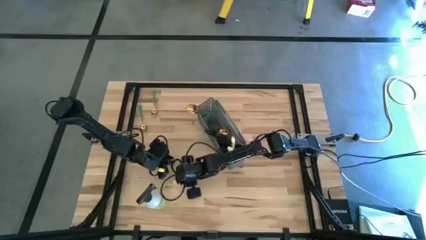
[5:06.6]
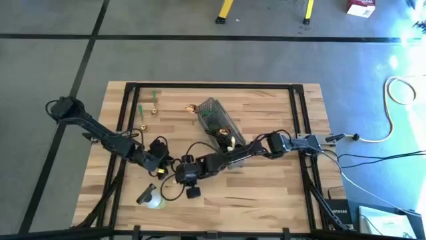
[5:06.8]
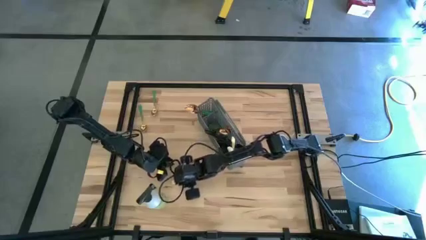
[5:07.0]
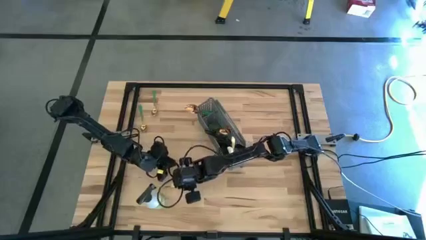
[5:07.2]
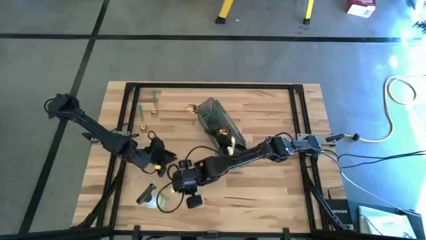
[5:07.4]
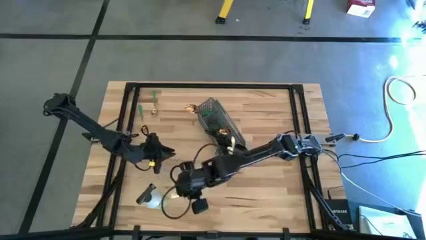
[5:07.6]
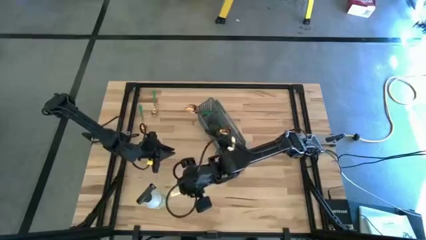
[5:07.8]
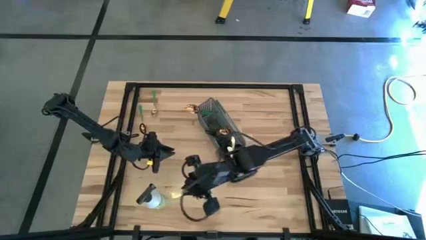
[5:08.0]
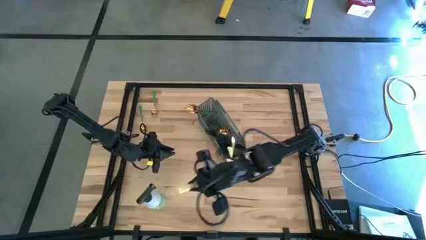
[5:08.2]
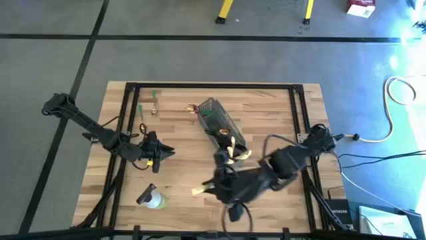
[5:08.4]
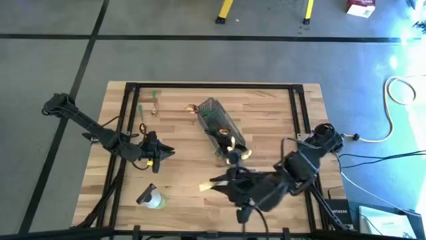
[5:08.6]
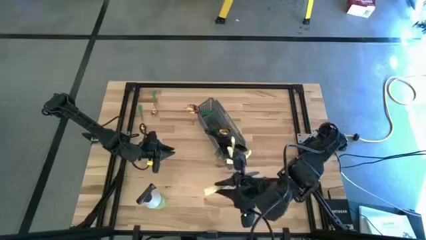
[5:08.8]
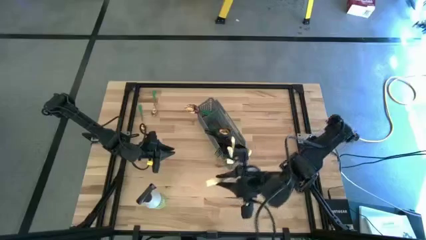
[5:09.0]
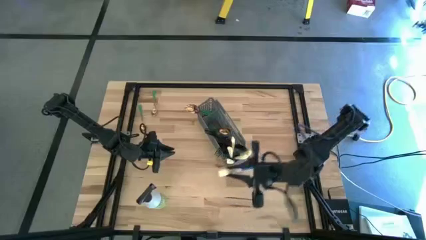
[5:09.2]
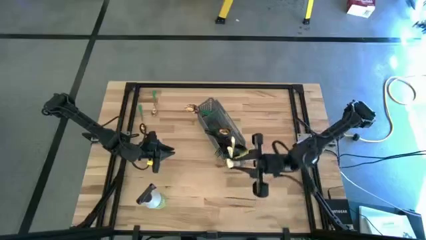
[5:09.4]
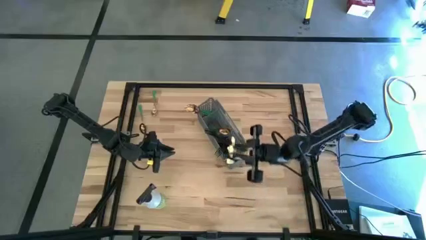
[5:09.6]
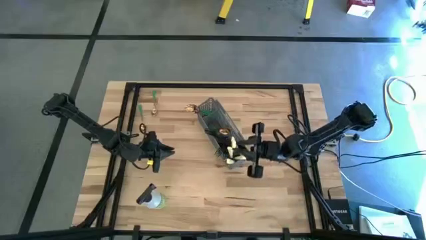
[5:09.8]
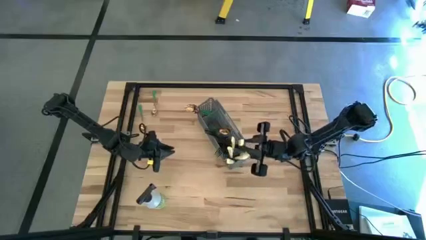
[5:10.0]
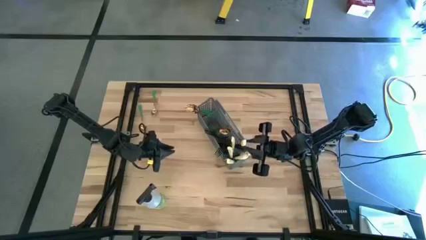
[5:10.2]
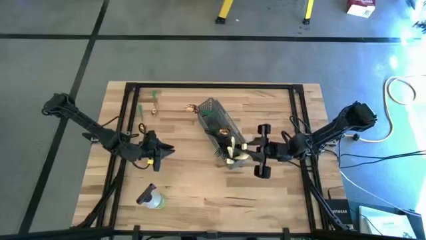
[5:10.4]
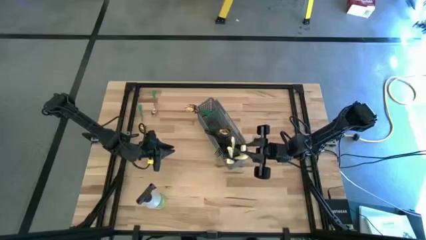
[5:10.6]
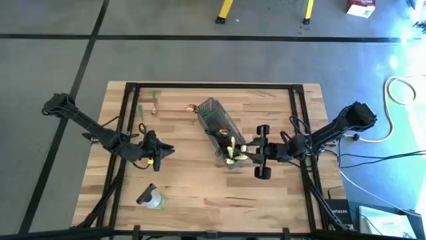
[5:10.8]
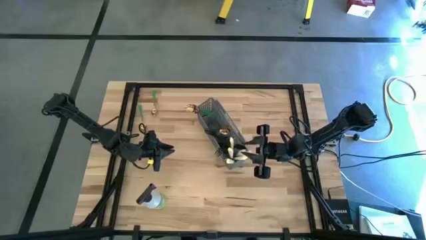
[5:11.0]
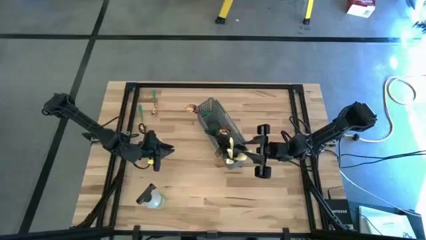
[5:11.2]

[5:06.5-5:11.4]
Task: Sort silverware
Put the silver knife into the cutlery rack

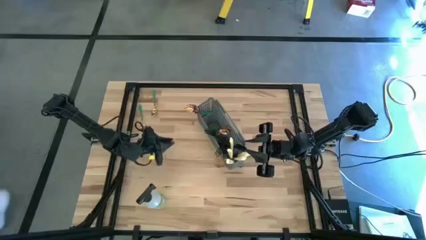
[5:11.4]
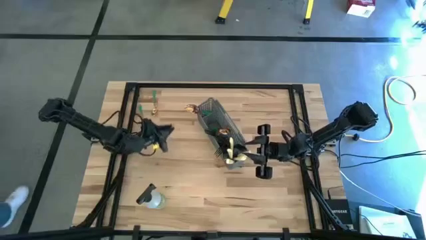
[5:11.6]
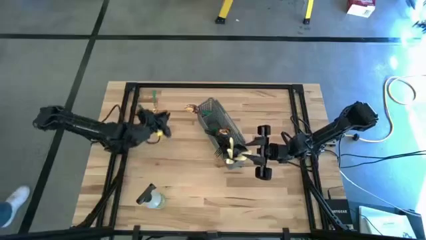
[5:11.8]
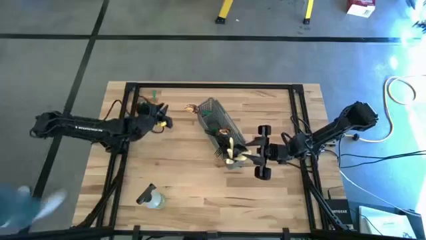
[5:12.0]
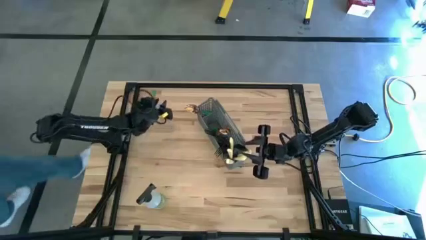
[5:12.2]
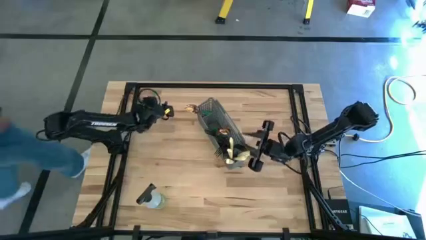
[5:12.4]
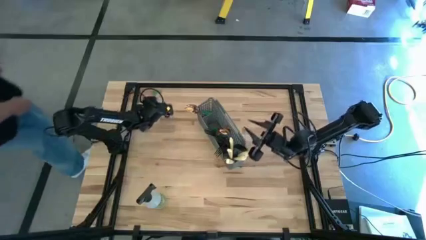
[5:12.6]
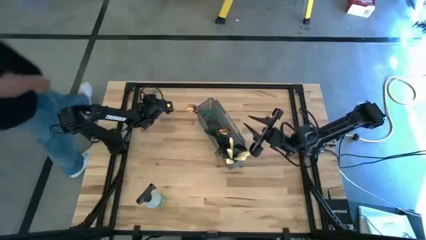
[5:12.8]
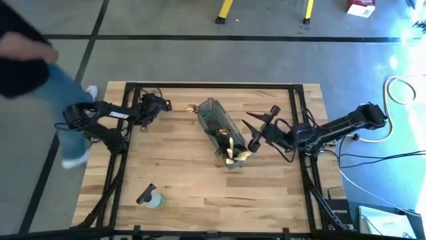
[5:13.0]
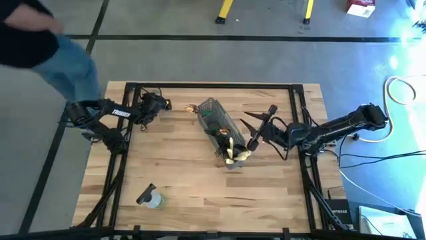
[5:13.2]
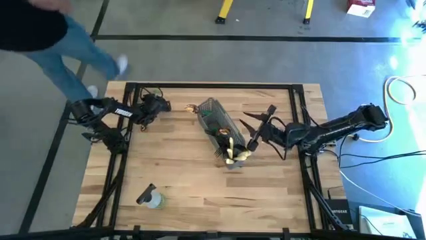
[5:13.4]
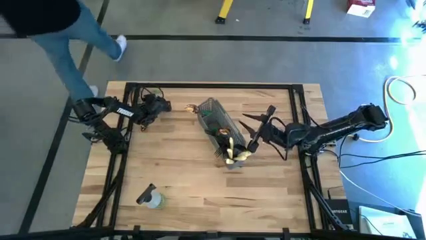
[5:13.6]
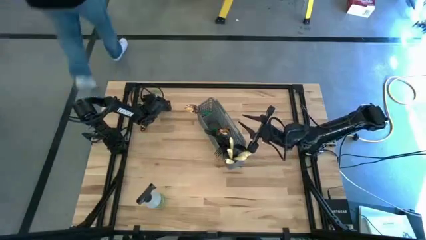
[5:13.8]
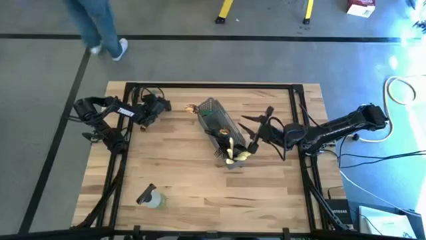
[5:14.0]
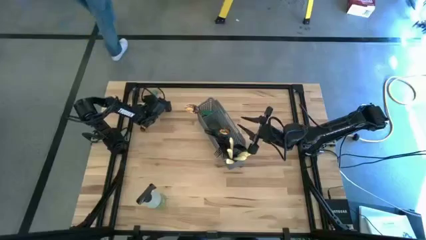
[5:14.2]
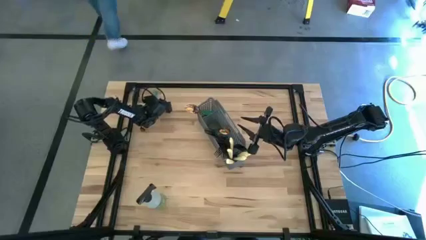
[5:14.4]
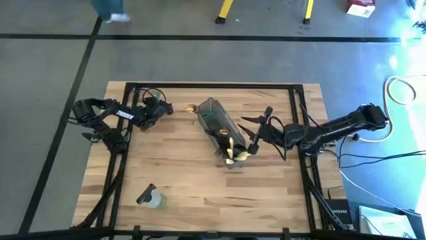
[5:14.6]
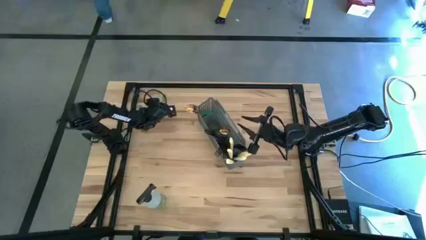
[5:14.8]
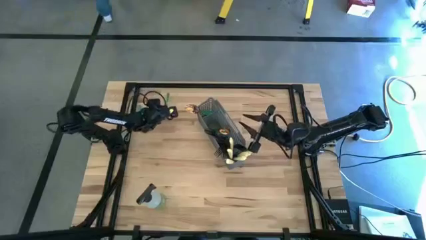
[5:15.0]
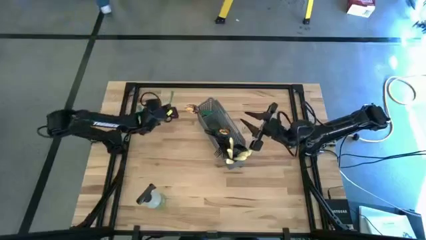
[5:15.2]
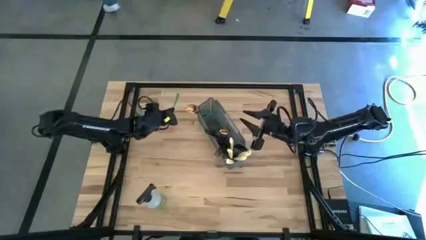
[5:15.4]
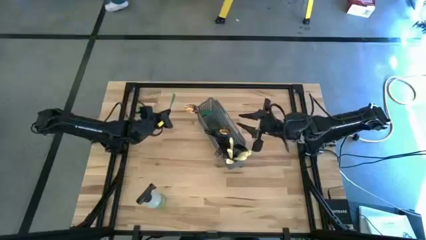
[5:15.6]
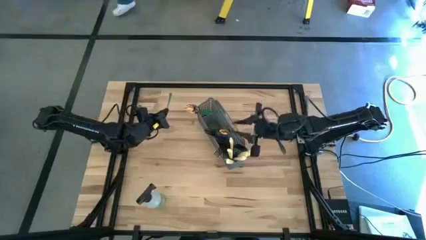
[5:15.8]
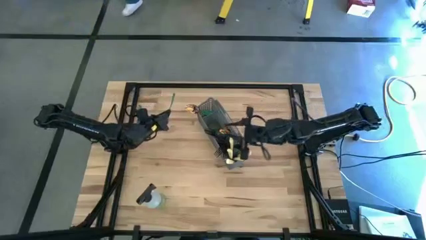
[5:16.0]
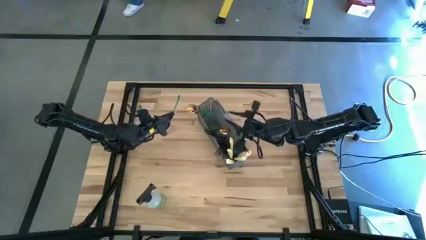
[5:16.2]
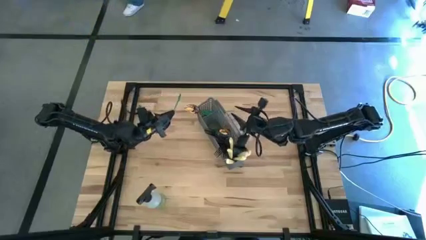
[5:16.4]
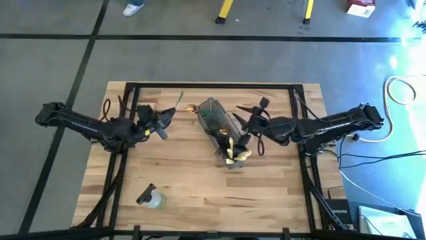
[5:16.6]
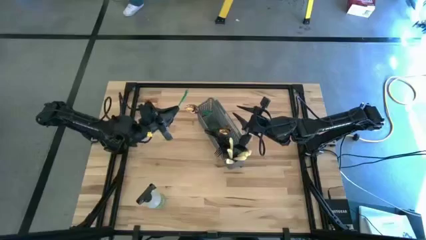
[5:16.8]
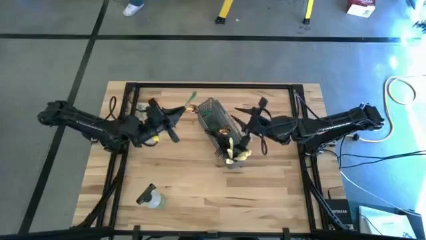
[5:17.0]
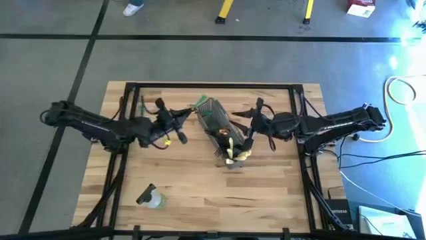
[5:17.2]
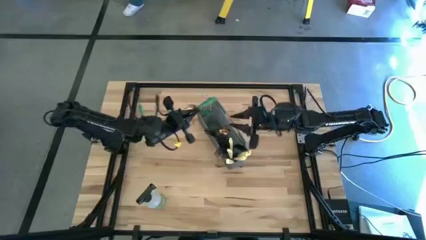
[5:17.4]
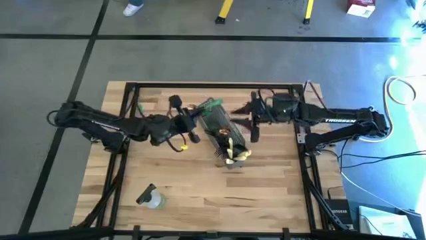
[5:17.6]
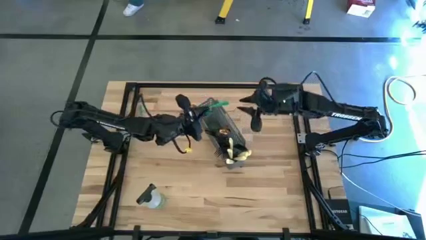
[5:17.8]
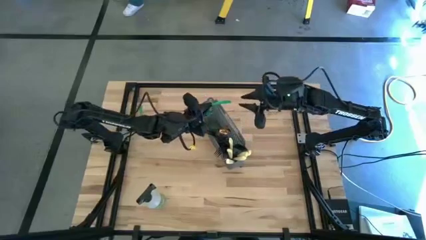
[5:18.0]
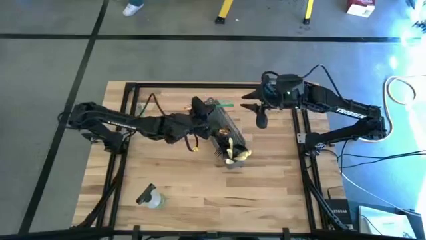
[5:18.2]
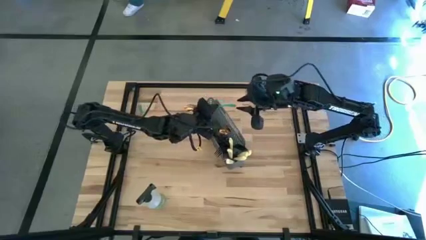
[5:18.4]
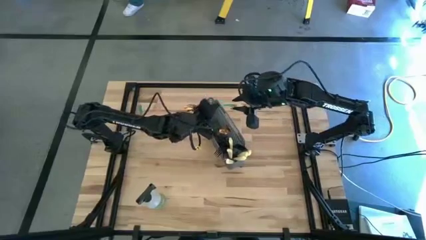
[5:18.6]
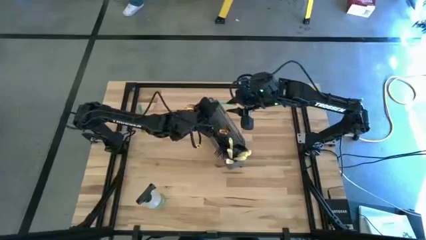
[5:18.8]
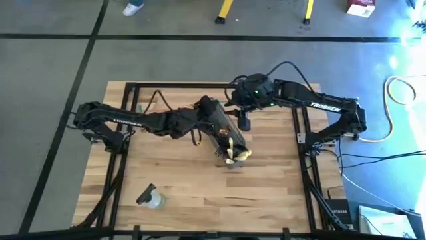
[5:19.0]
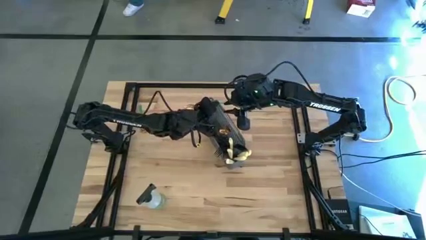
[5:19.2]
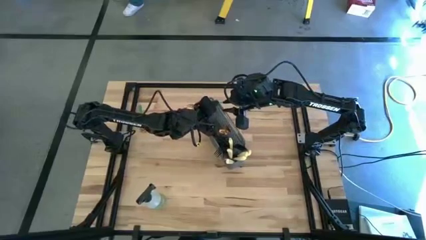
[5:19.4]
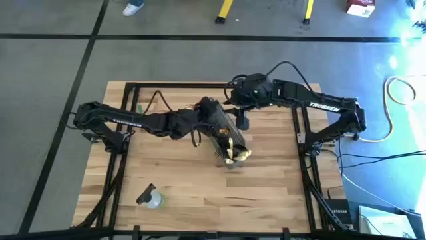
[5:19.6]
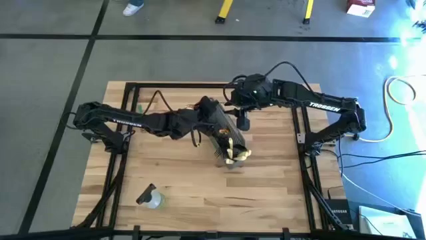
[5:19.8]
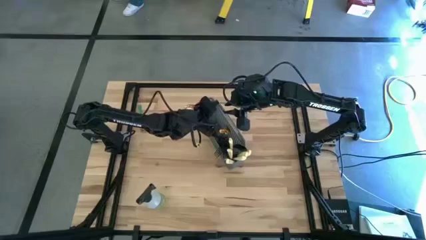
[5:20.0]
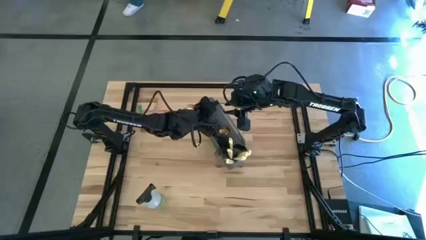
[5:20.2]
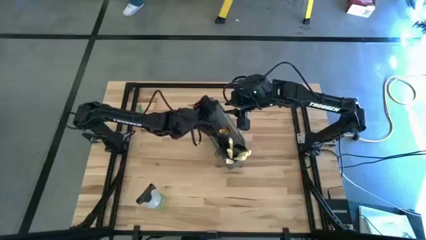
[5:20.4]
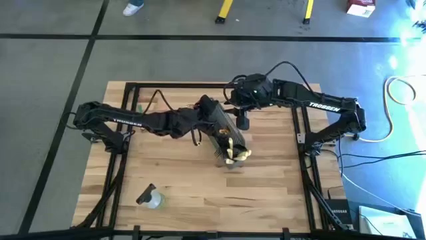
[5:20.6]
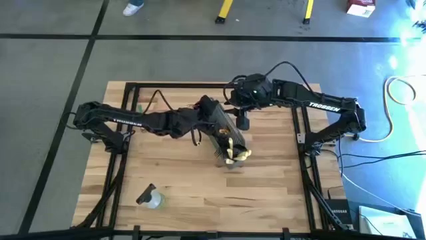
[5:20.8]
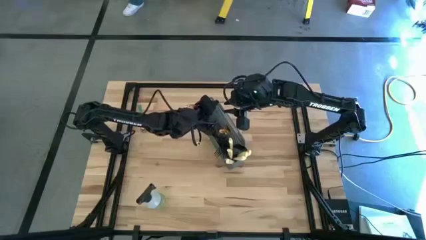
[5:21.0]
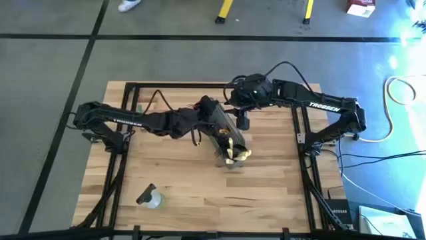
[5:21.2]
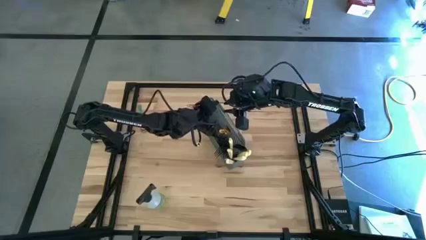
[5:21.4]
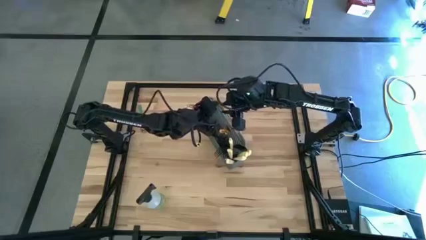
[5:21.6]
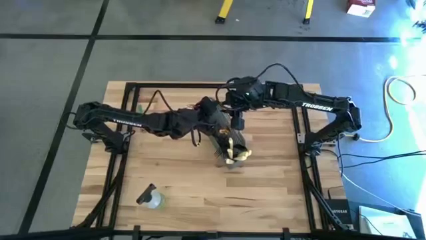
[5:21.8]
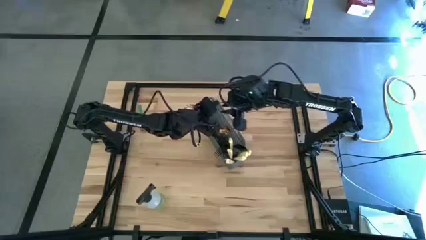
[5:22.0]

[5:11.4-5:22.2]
Put the gold spoon into the cutlery rack

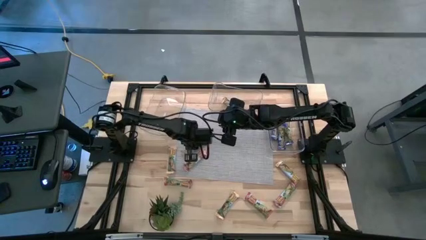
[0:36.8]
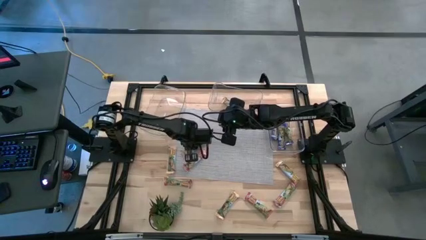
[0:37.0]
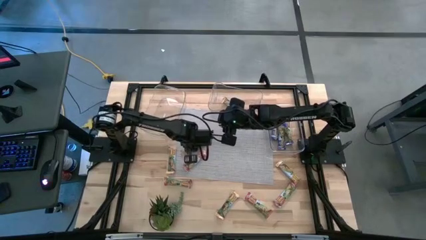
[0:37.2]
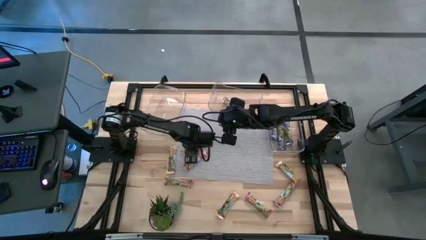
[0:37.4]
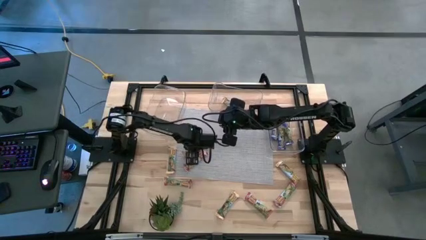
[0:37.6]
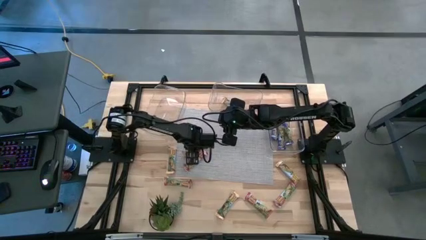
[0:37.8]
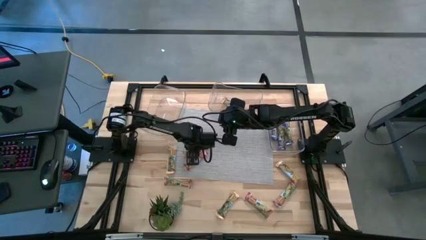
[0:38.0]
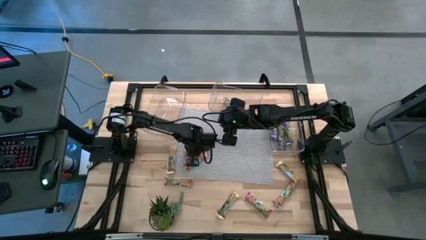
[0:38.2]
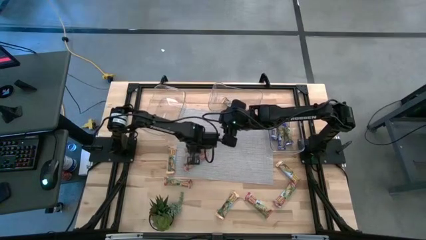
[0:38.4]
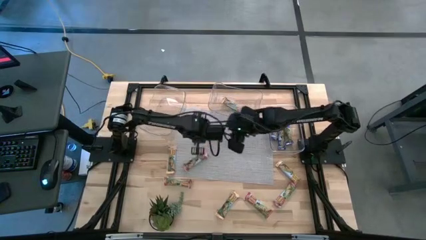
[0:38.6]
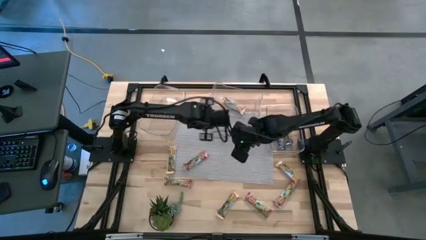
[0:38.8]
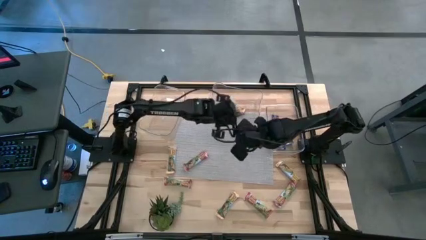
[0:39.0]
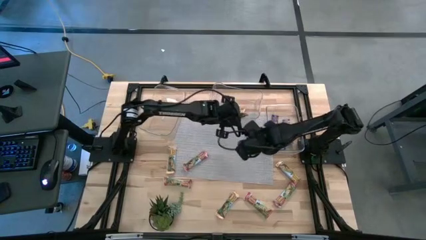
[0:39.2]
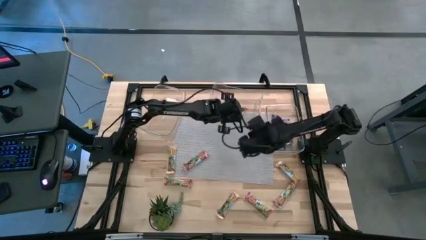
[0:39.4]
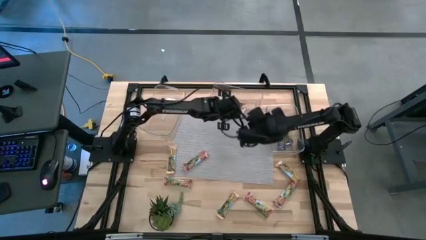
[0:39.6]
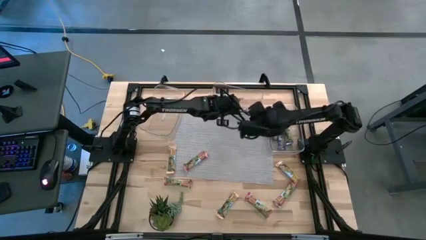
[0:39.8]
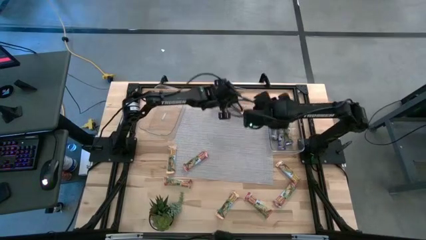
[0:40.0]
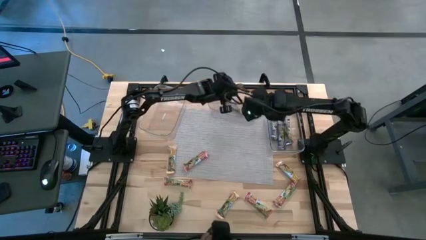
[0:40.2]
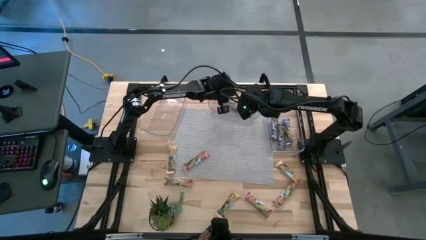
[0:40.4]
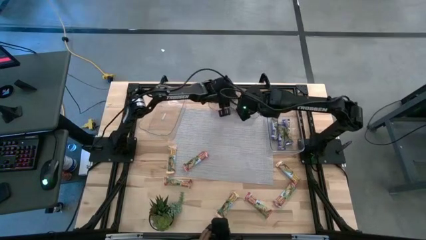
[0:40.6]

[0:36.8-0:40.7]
Task: Pick and place Granola Bars by type
Put the yellow granola bar into the middle transparent bin
